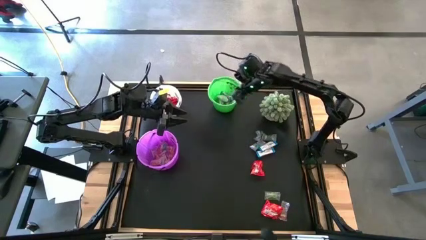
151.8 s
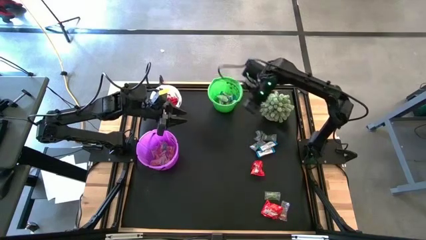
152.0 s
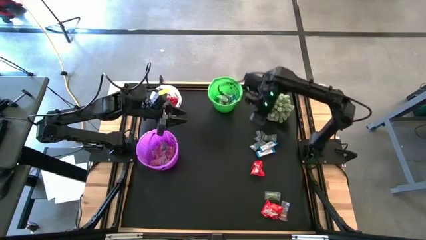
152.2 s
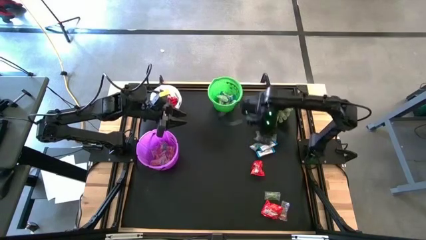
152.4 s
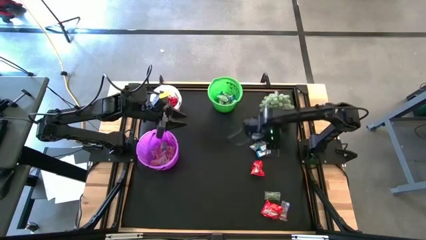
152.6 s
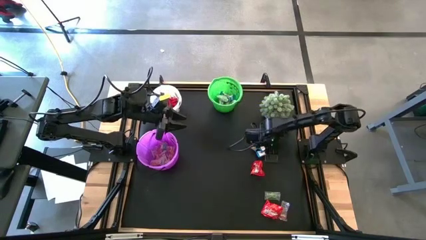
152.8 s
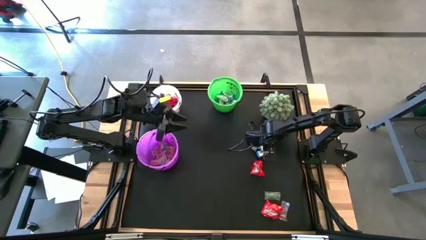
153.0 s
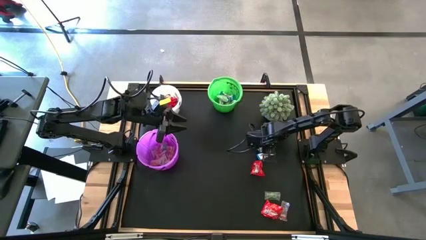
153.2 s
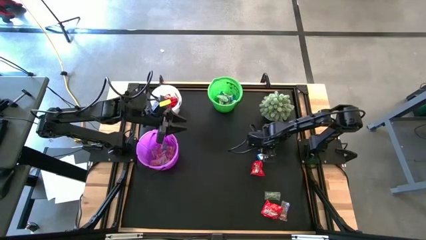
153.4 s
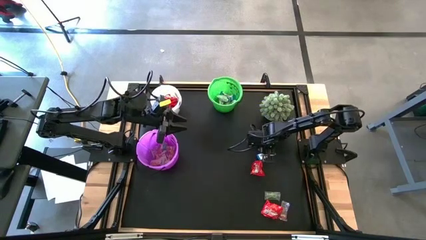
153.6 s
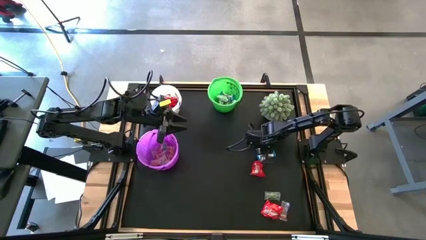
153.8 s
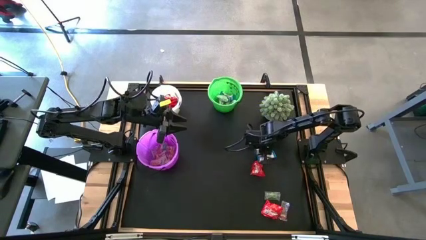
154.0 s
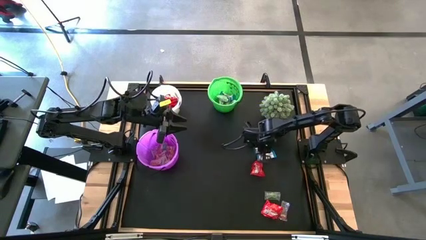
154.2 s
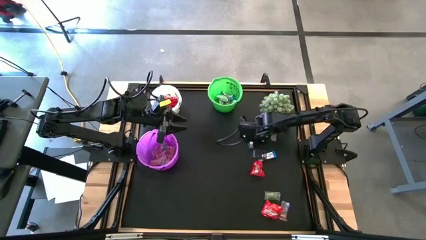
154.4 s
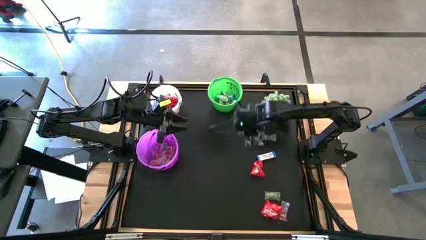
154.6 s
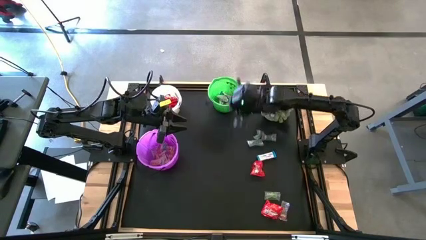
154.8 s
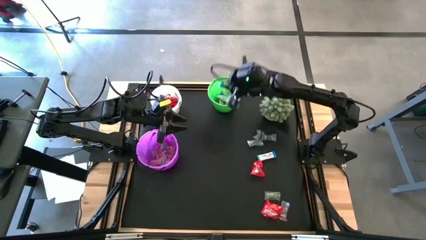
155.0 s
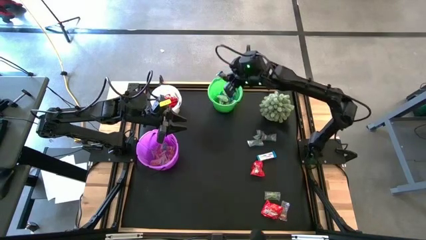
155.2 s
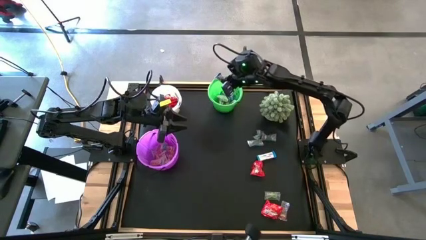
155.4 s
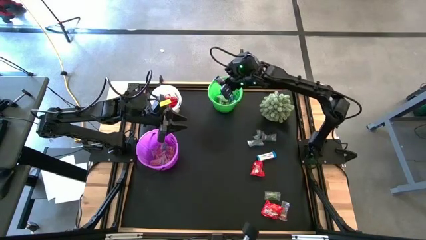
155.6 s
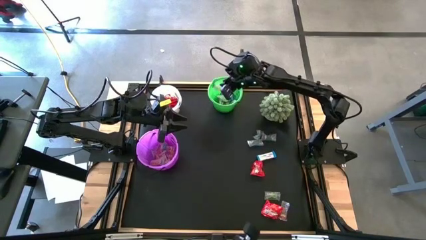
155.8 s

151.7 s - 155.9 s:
Task: Sort candy
Put the white chocolate into the green bucket

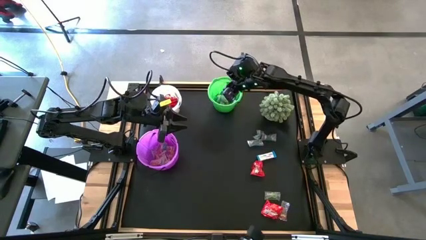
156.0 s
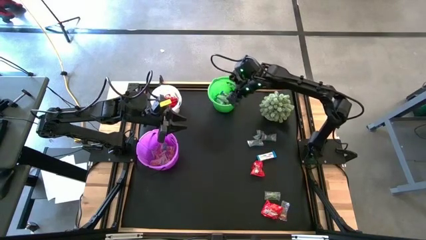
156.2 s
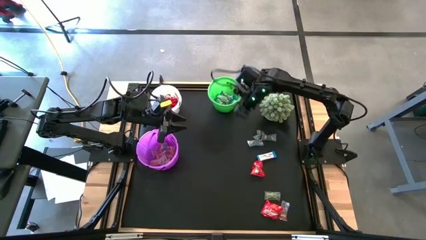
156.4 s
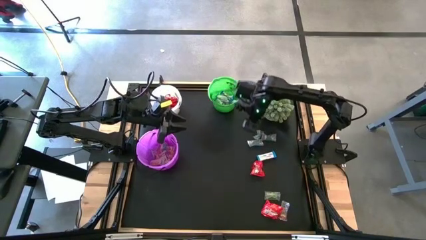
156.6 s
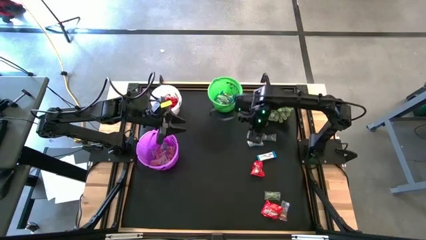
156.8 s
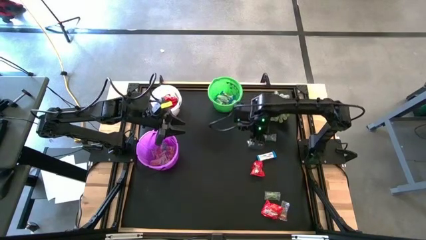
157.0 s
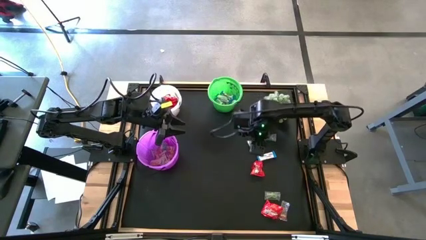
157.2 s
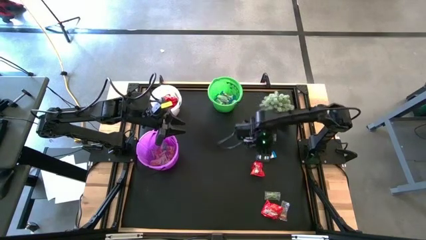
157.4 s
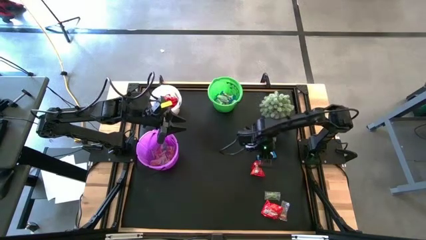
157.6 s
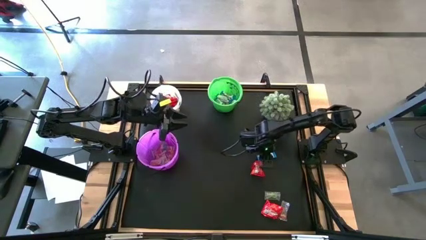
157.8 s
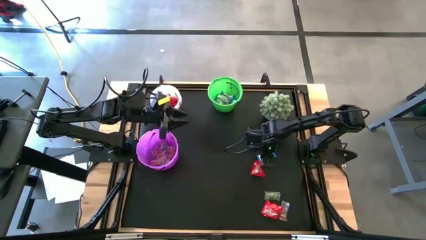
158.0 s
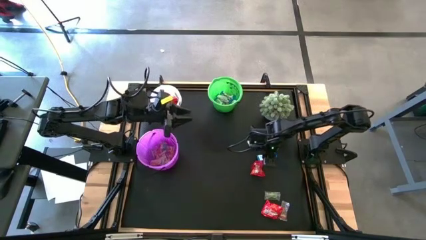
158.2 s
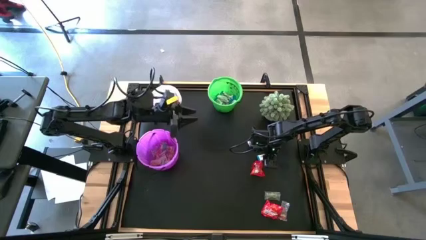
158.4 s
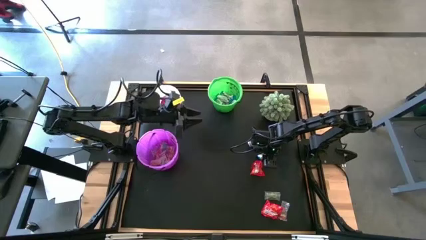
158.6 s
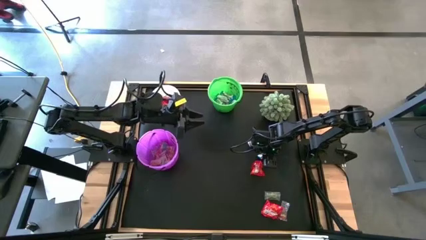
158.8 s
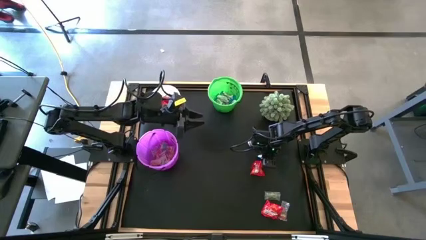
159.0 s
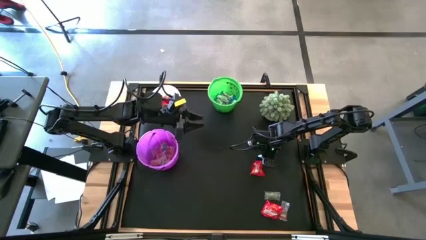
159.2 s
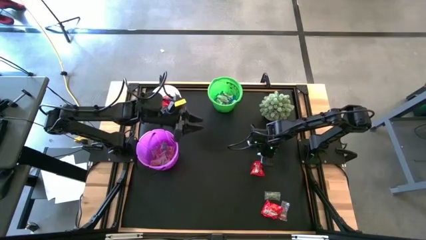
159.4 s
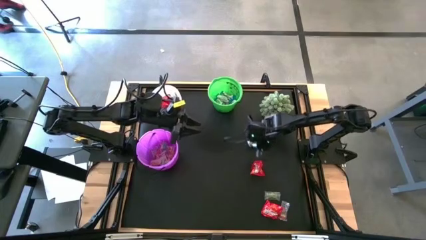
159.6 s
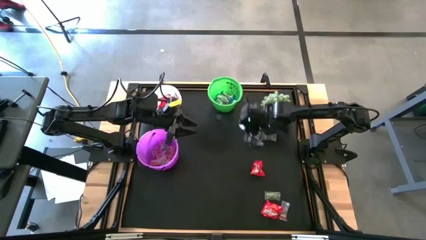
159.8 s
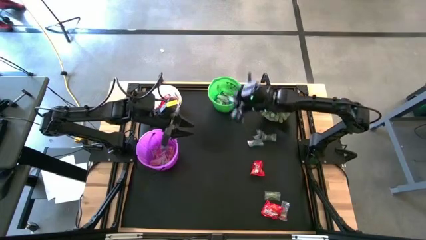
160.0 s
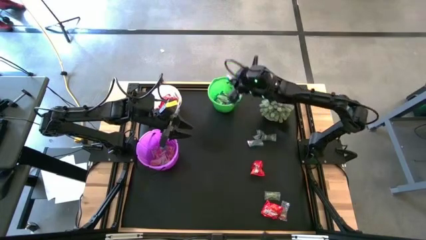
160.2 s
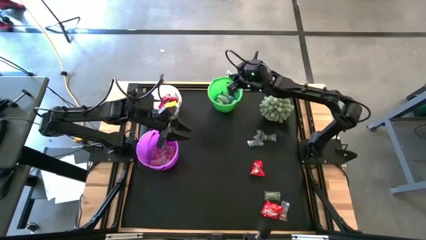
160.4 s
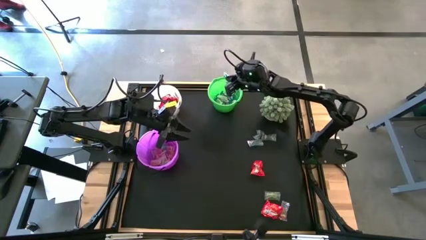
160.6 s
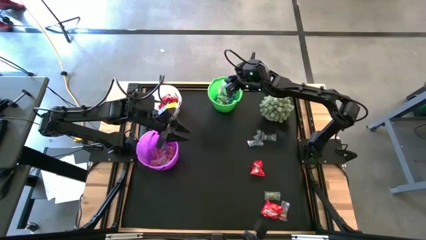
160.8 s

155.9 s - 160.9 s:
Put the white chocolate into the green bucket

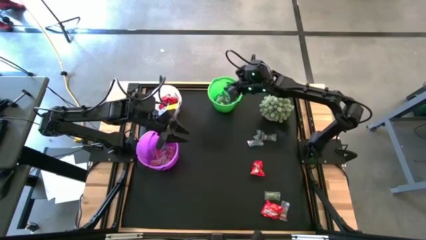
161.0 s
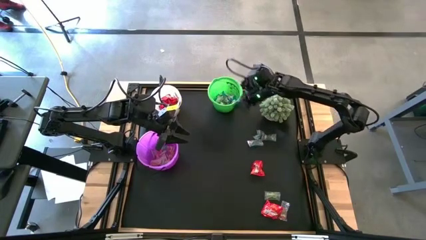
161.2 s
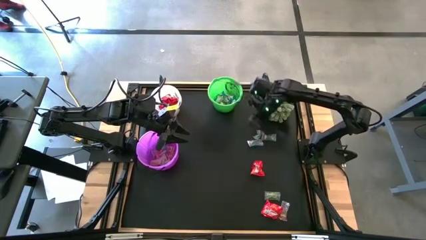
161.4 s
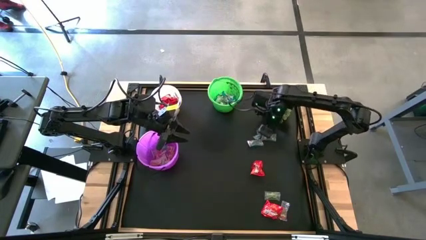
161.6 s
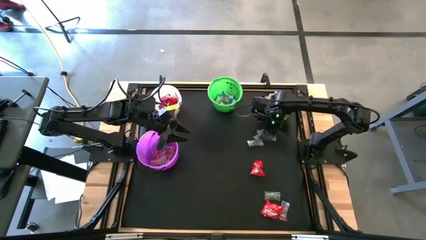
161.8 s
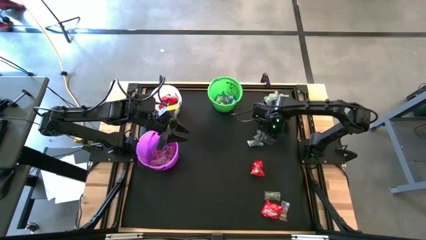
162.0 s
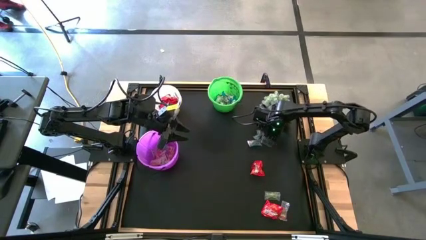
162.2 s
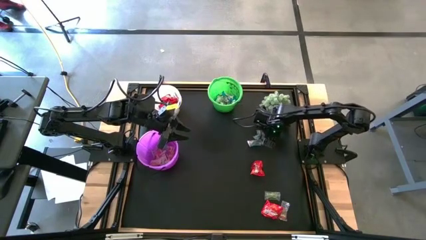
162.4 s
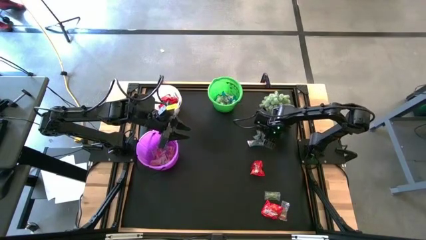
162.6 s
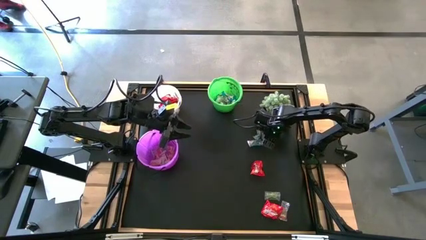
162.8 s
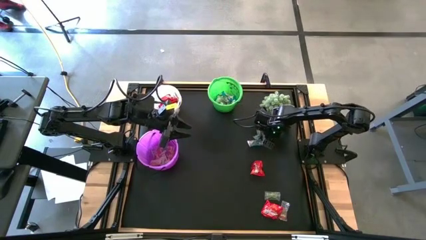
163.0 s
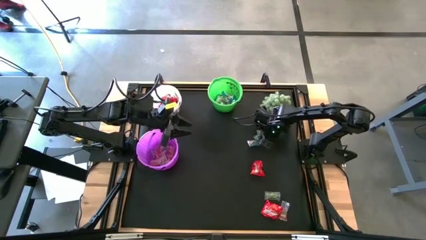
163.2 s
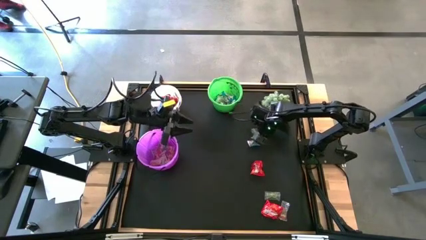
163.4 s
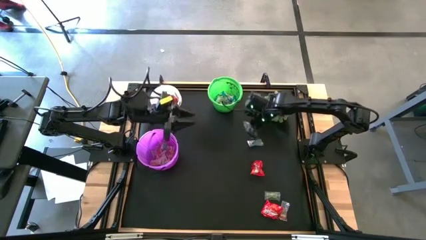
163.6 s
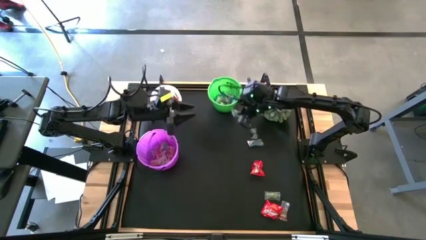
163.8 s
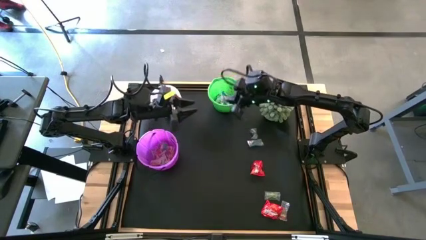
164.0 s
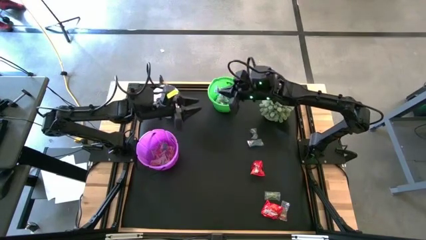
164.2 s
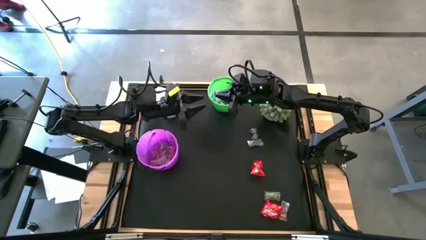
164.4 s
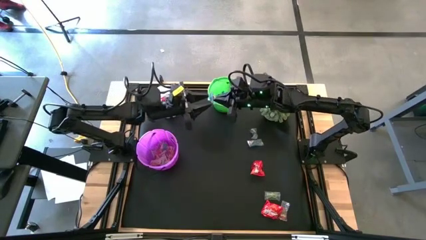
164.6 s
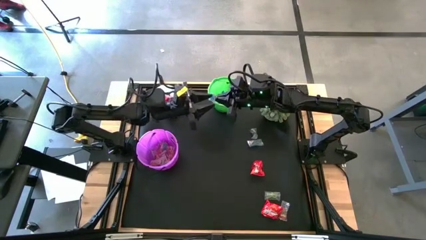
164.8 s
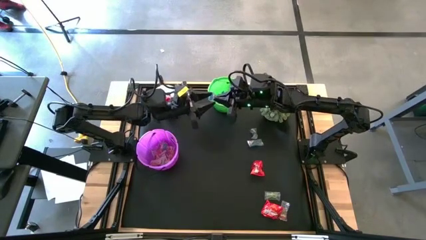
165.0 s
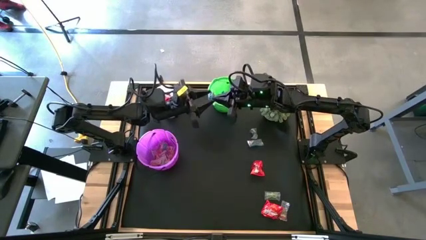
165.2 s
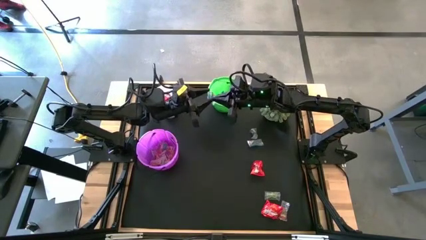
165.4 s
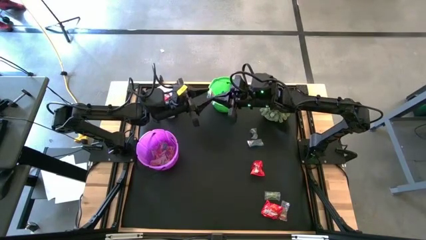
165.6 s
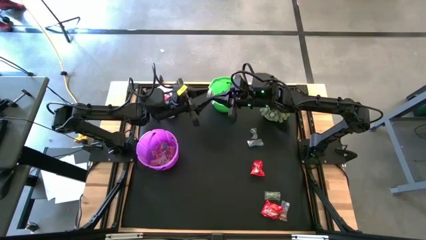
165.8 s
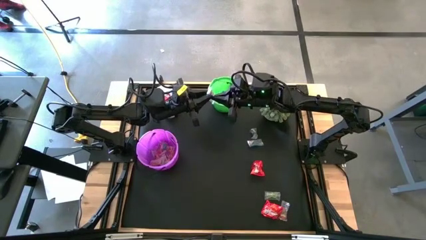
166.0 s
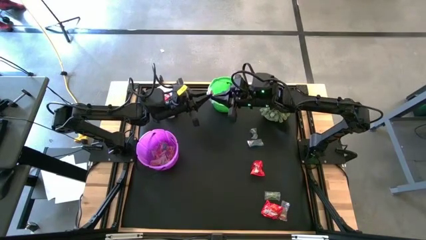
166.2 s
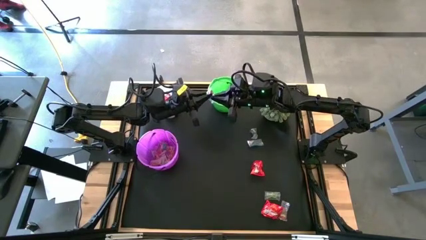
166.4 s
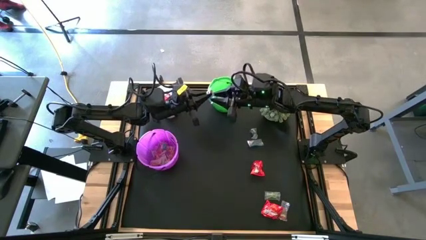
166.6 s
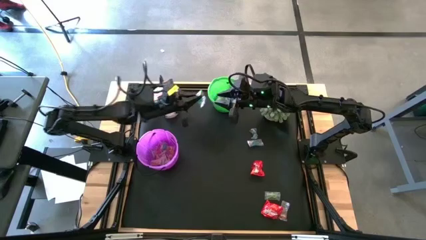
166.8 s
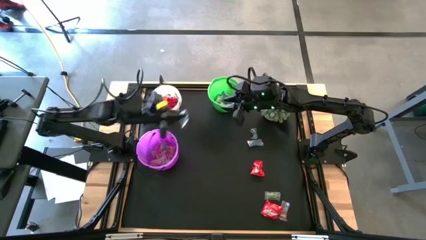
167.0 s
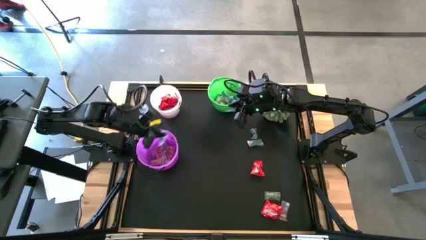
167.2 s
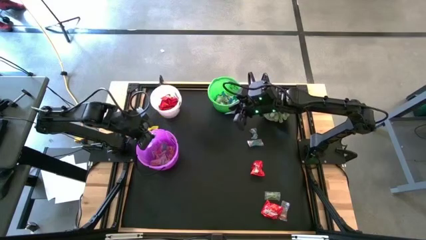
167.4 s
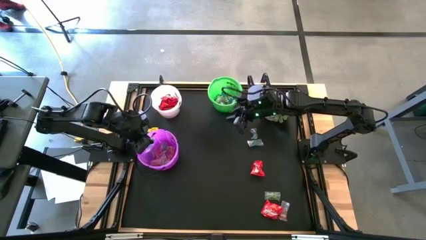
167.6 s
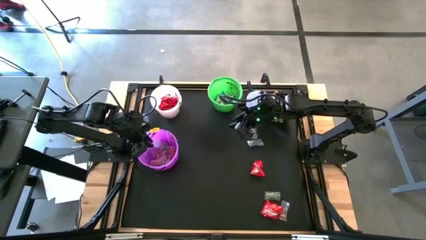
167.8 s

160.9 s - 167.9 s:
Put the blue gummy into the violet bucket
